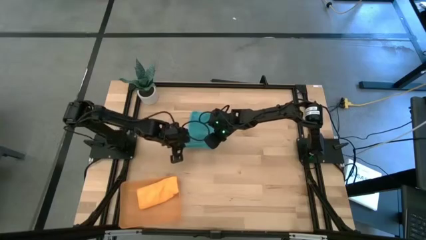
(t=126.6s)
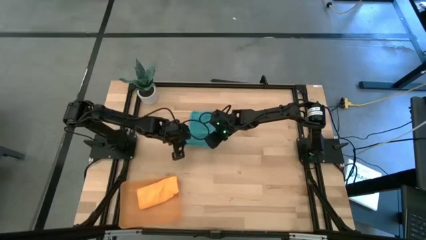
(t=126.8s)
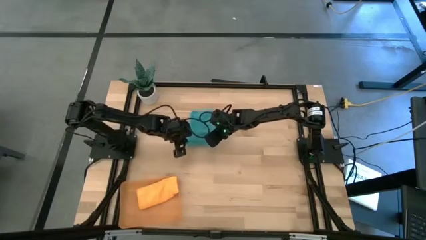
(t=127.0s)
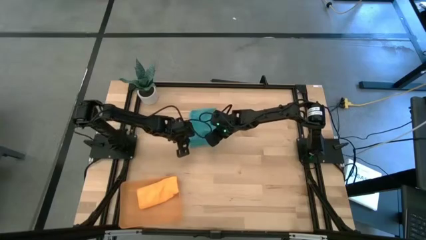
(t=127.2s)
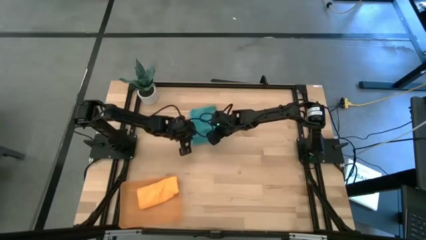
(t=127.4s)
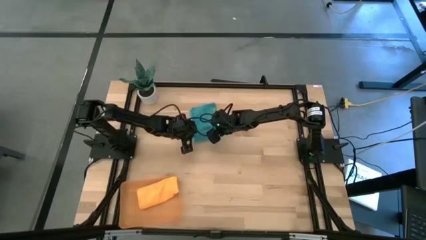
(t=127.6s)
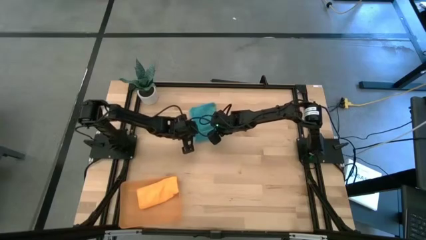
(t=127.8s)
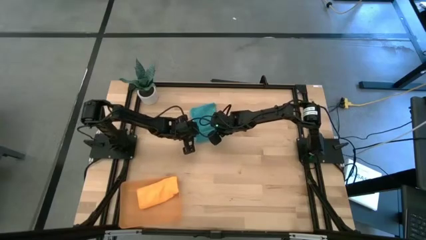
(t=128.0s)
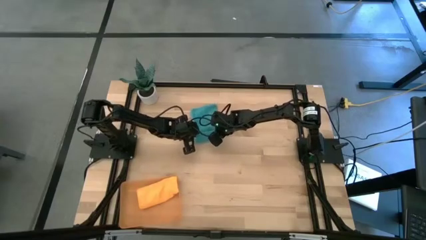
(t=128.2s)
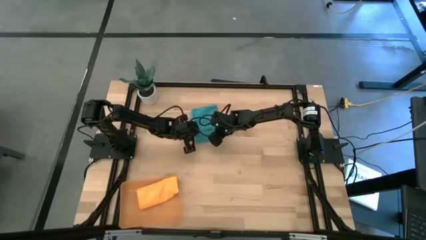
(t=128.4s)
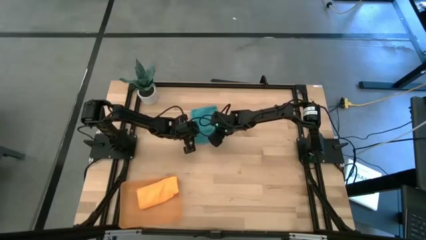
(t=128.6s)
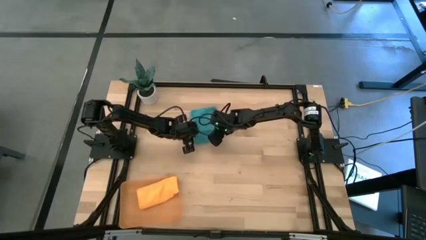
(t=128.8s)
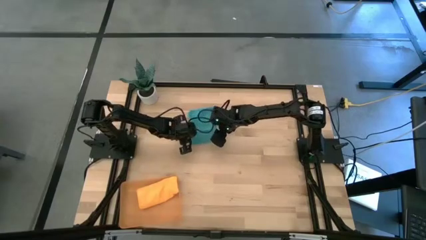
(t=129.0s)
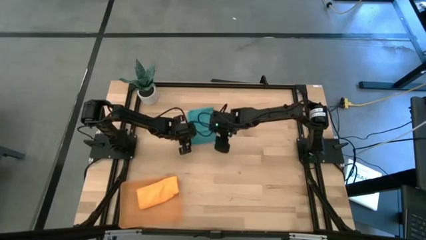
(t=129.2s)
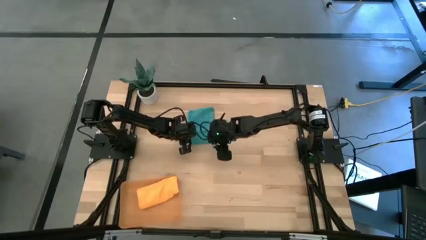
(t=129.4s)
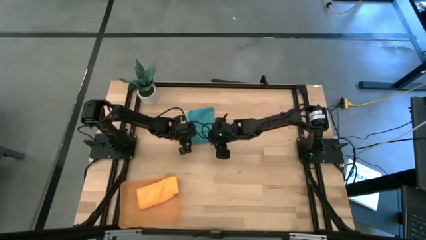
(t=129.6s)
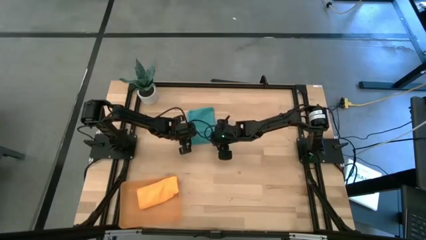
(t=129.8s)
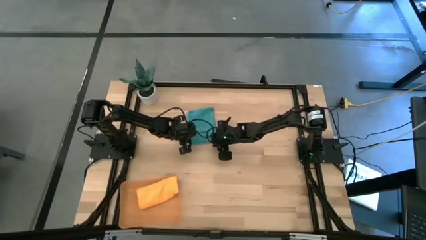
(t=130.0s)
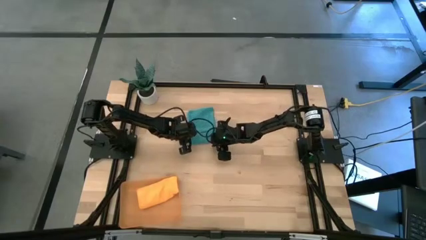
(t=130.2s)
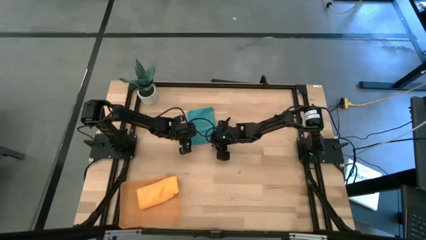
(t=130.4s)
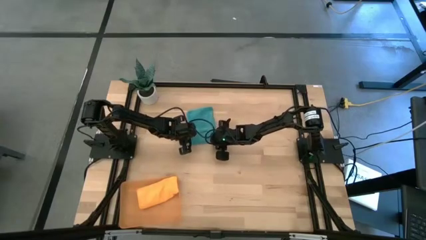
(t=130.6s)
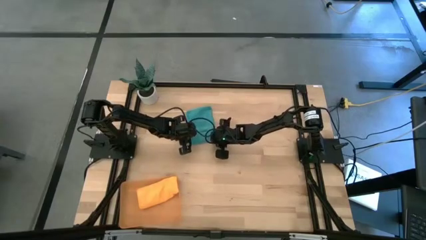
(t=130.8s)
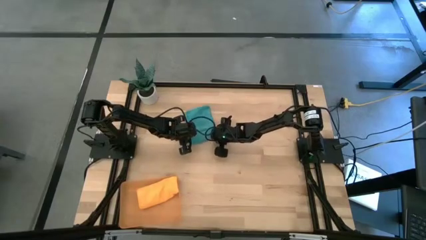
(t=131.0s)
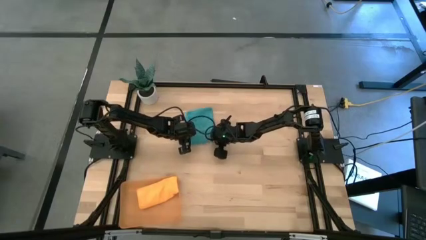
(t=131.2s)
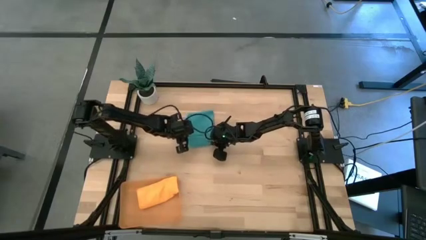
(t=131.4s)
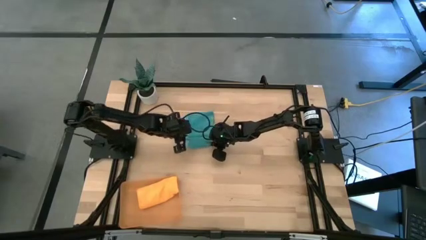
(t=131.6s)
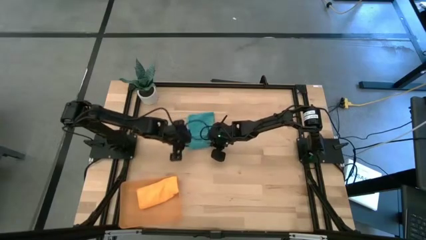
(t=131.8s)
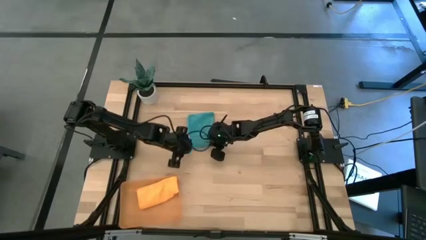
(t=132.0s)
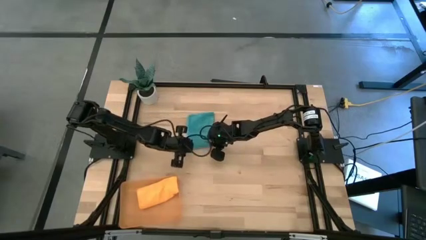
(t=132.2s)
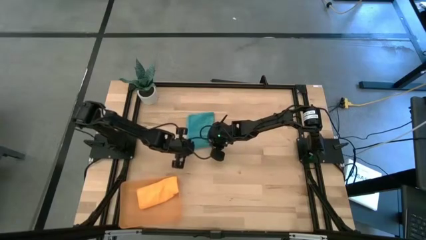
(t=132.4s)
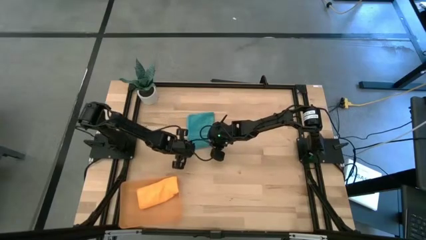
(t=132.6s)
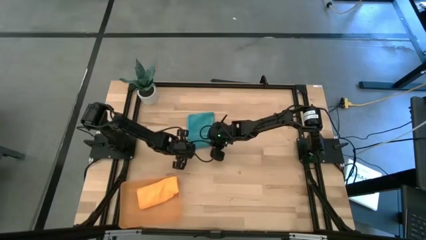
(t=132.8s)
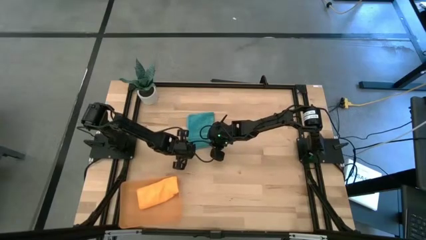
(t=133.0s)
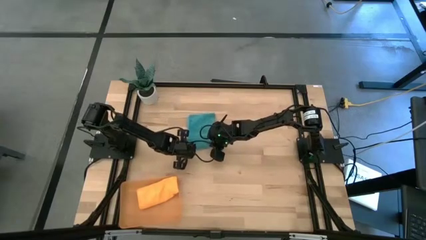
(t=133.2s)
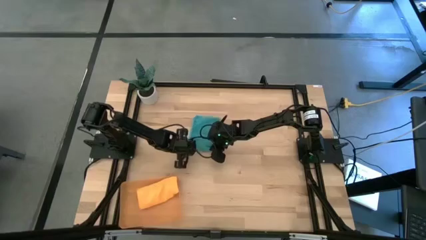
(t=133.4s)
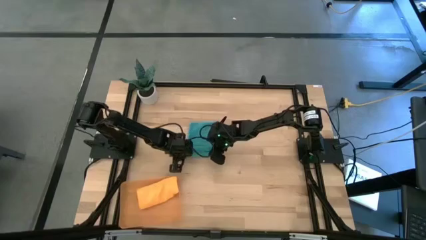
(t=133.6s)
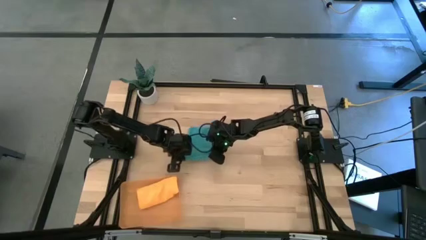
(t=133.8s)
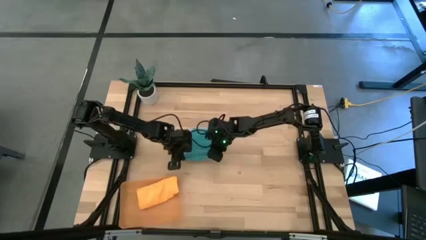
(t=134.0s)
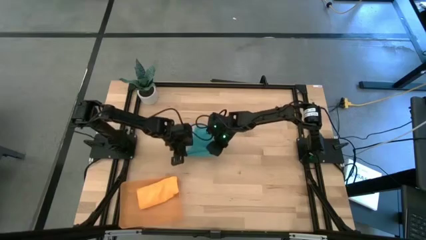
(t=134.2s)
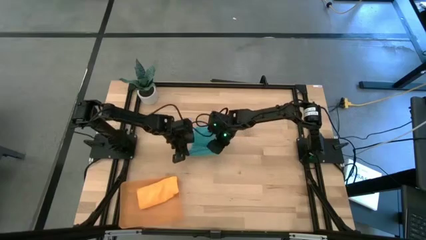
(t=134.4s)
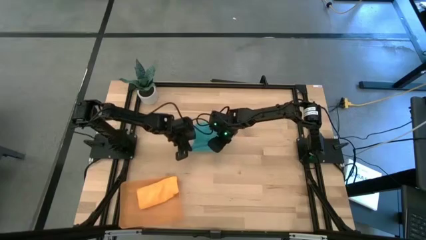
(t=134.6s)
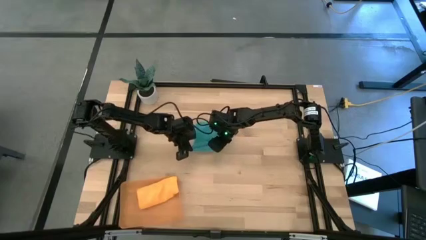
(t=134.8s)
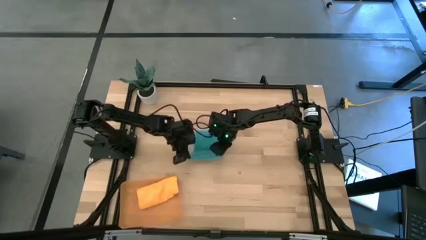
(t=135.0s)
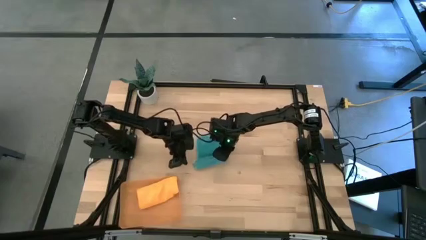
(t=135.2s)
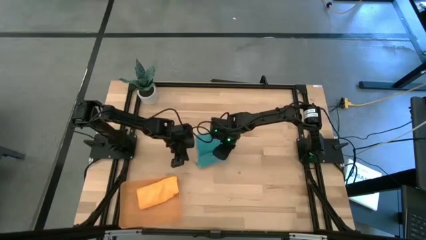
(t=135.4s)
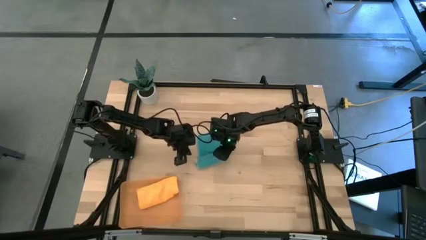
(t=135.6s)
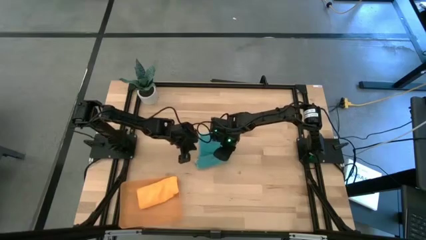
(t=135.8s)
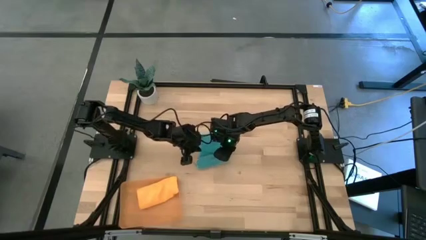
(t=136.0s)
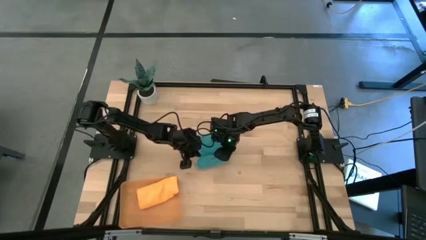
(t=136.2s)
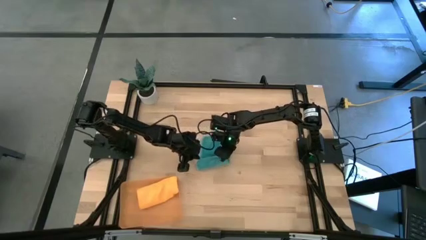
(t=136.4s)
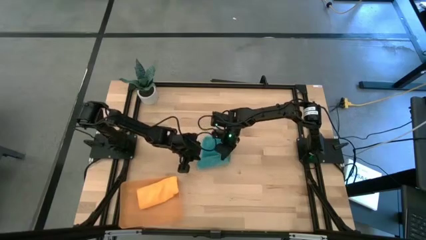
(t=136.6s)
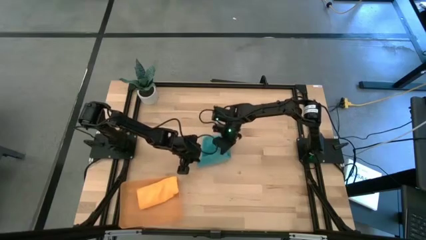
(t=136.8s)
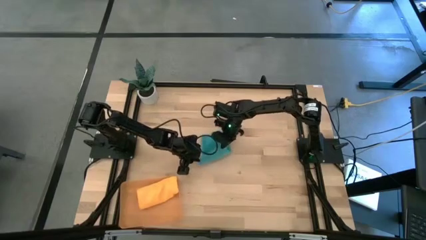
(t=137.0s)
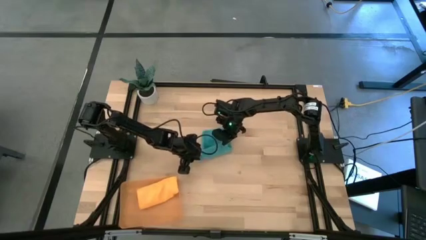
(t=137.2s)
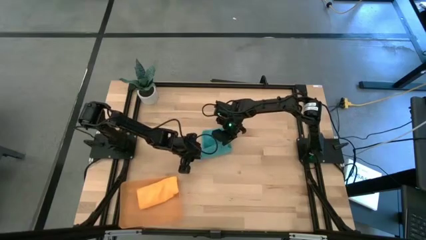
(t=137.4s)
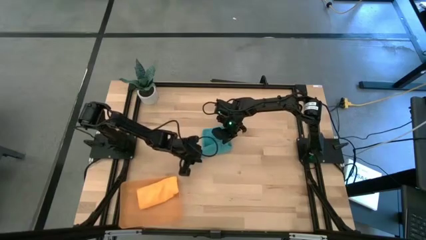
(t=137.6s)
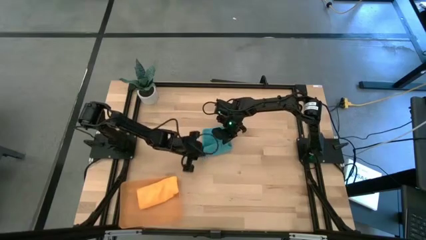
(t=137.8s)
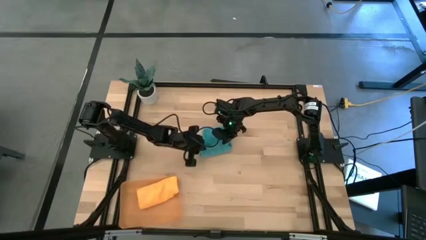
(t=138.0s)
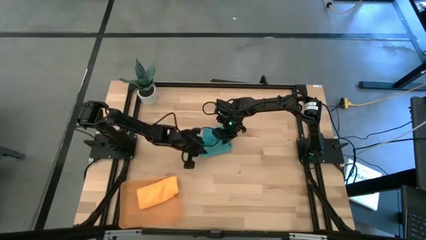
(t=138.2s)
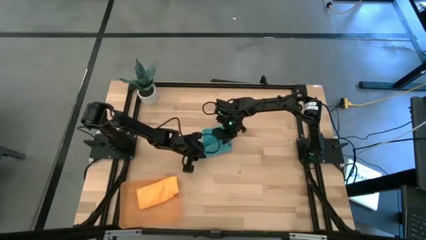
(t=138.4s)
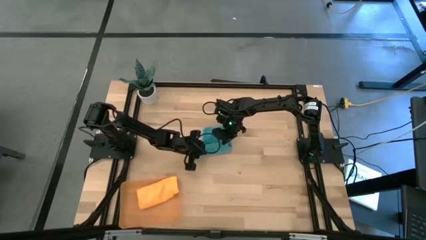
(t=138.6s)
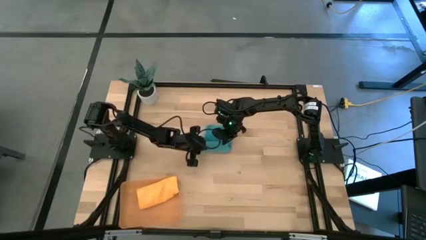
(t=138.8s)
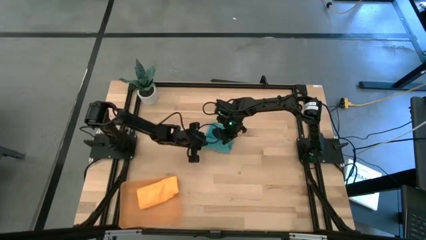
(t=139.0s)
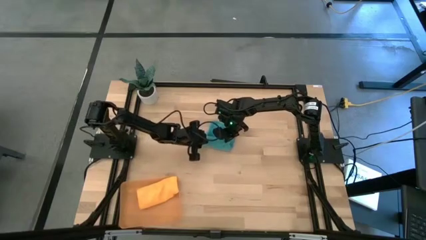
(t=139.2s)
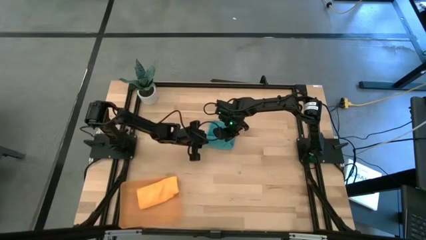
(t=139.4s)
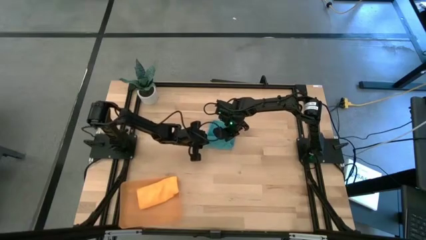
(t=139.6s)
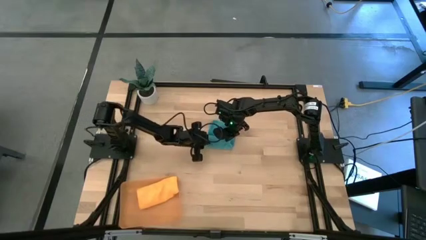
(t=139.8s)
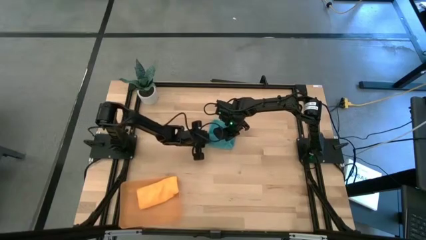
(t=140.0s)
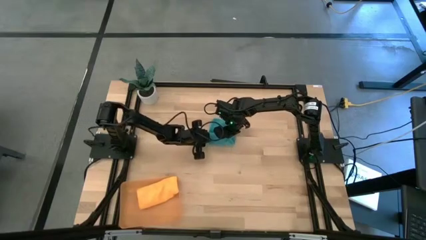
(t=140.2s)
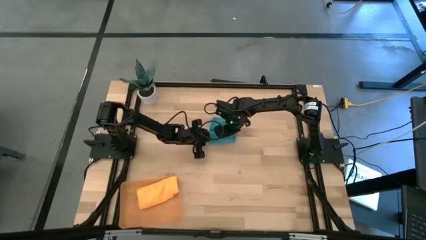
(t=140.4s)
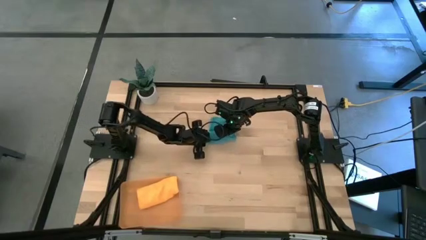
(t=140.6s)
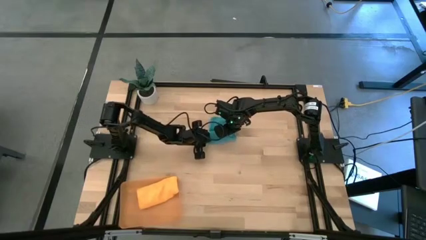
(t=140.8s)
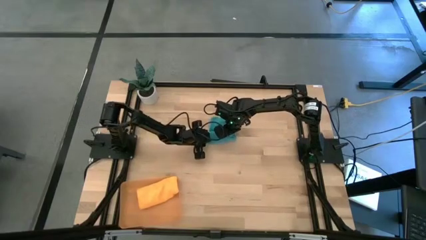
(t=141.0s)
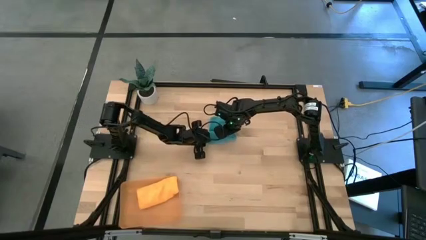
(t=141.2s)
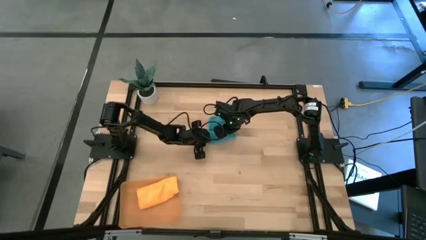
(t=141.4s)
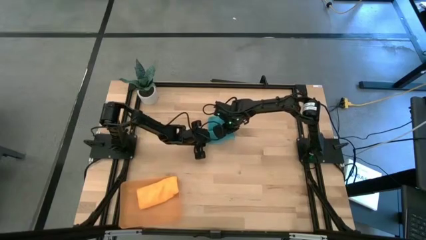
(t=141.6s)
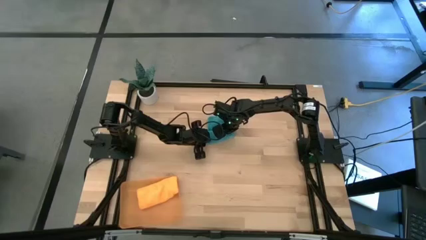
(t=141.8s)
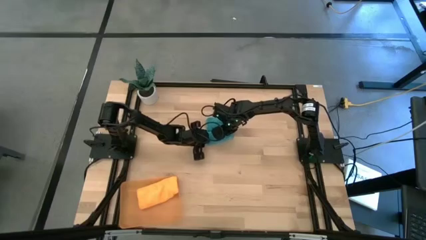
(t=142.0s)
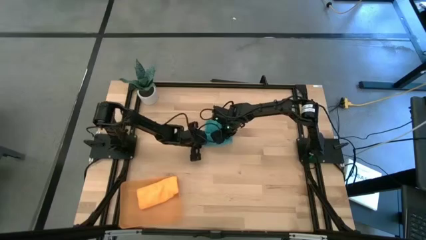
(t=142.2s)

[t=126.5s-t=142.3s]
Task: Roll microfiber towels into tight, uniform cylinder then place into a basket
Roll the blue microfiber towel

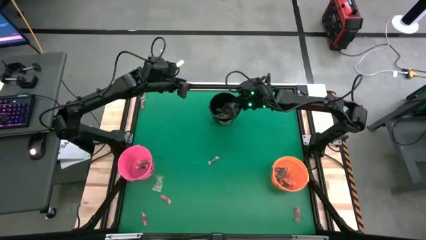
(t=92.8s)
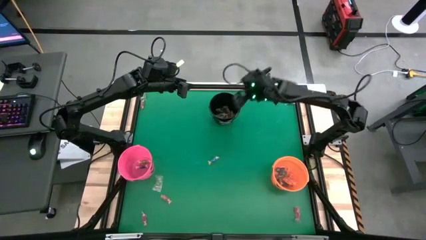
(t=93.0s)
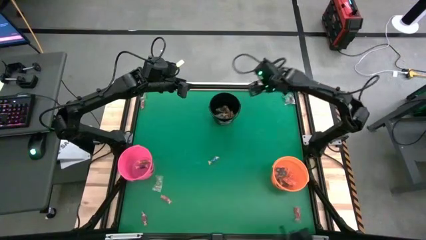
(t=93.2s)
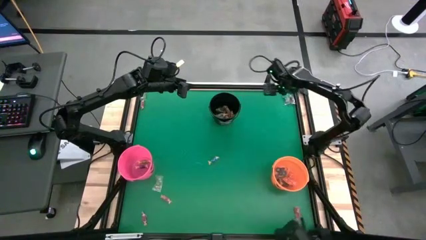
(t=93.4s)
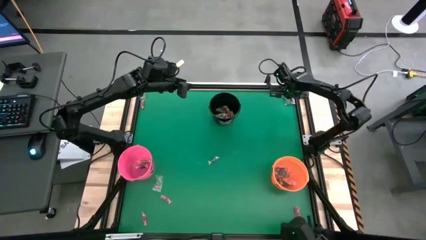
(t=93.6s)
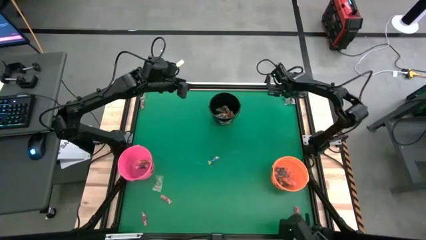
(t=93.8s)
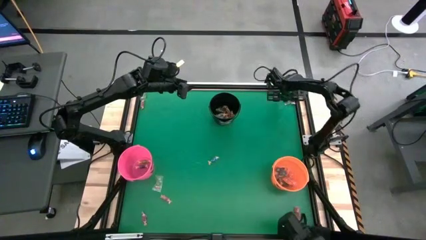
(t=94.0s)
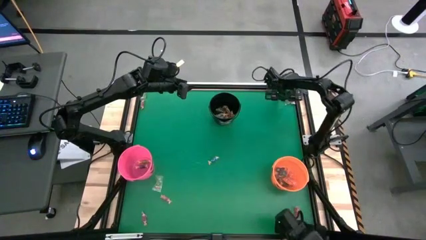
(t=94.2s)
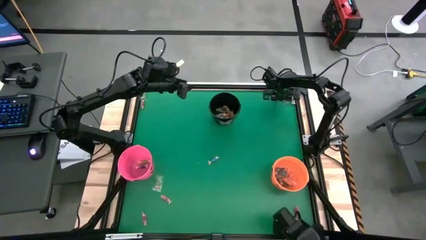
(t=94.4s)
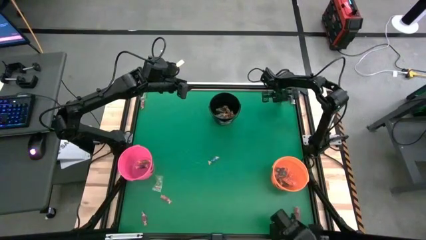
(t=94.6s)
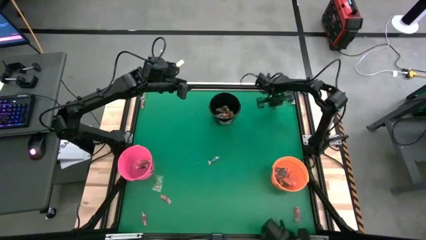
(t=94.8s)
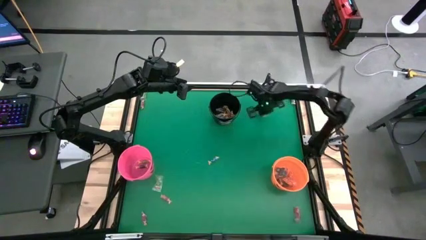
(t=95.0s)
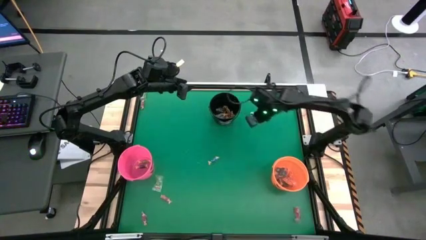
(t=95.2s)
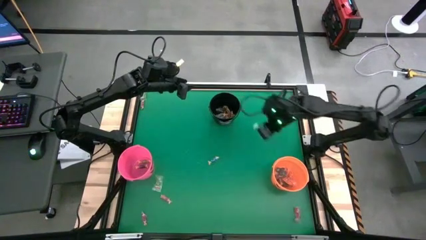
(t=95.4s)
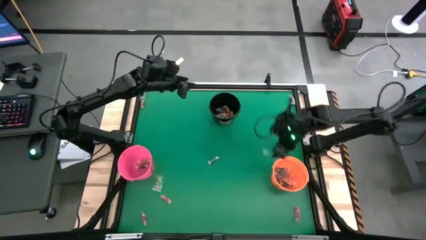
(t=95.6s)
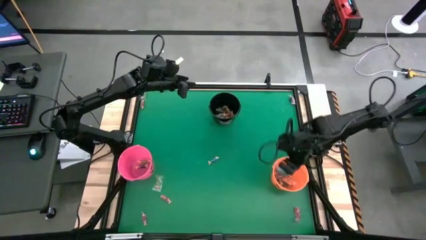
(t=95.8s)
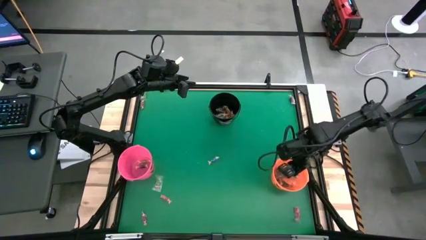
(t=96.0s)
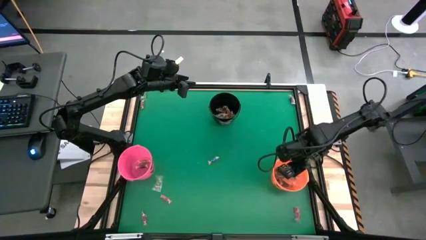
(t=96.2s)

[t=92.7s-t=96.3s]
Task: Sort candy by brand, put in halloween buckets
Put the blue gummy into the orange bucket
